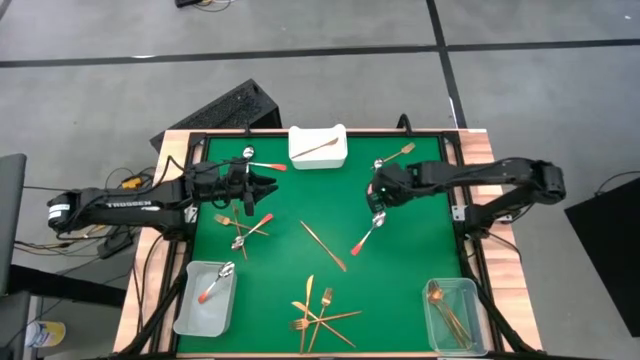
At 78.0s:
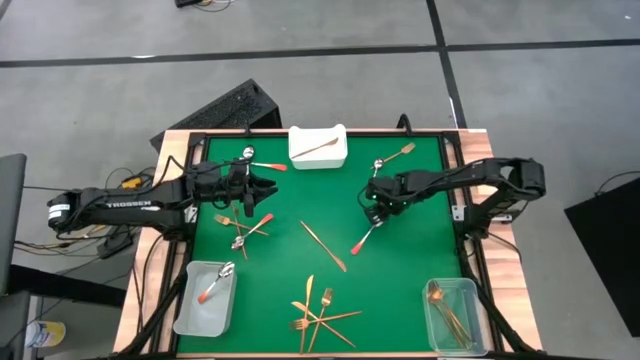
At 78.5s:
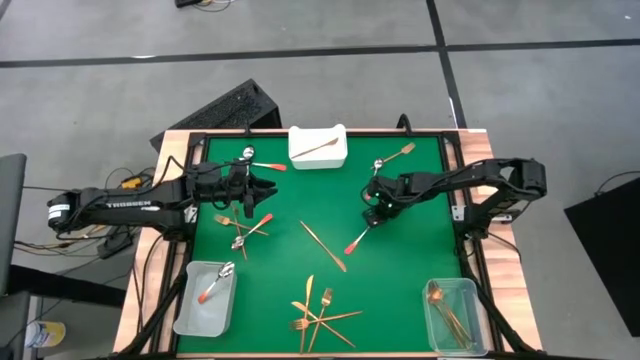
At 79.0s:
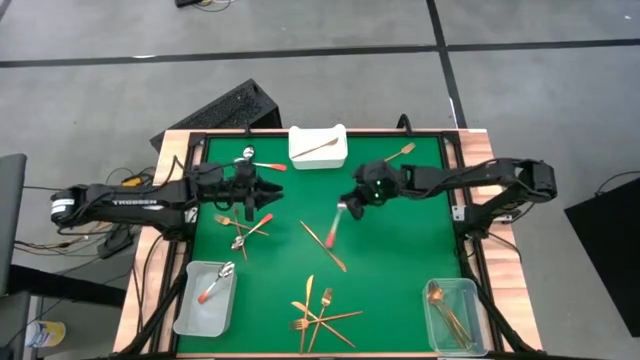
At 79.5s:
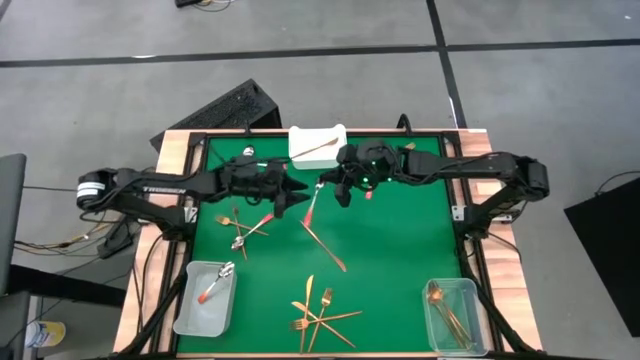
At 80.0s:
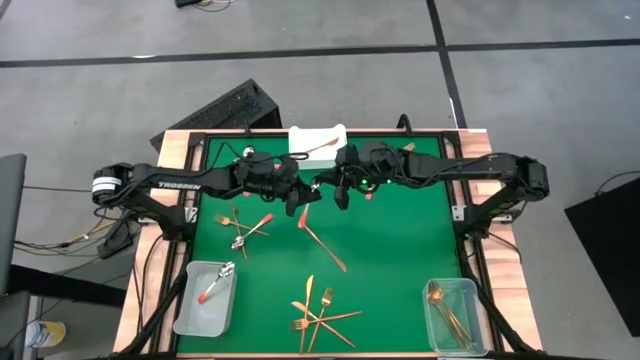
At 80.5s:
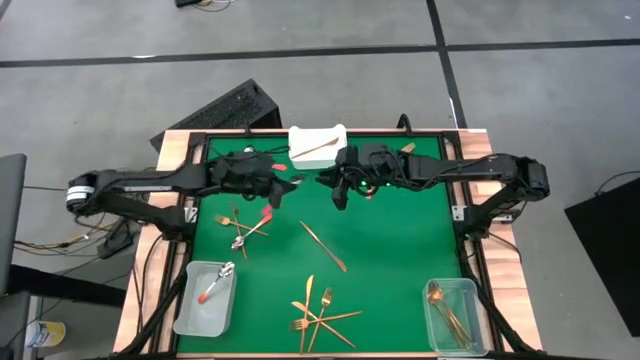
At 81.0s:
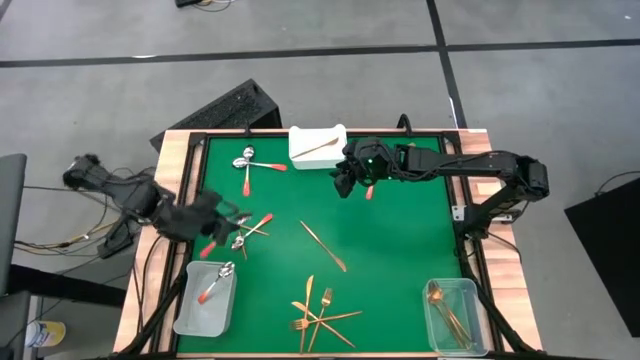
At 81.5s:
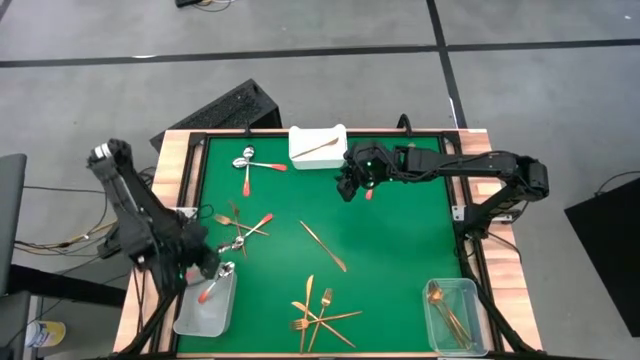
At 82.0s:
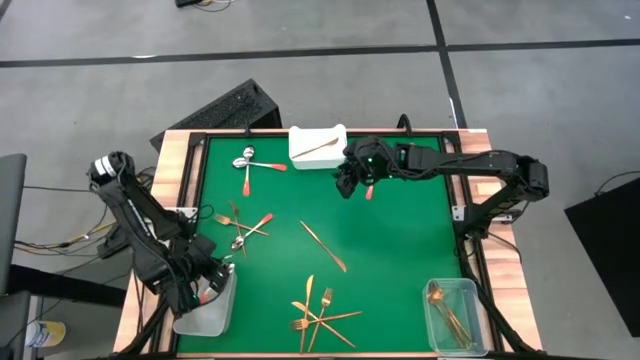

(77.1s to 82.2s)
Task: Sort silverware by color (type)
Put the orange spoon into the gray bin

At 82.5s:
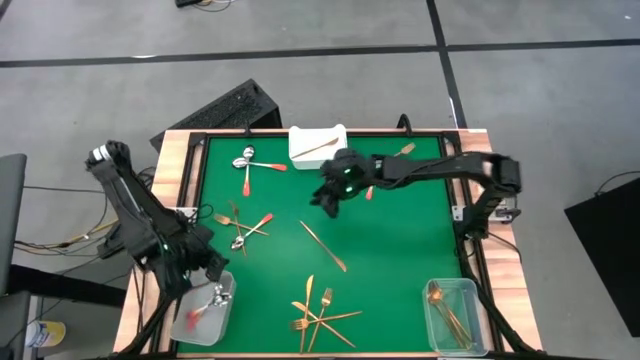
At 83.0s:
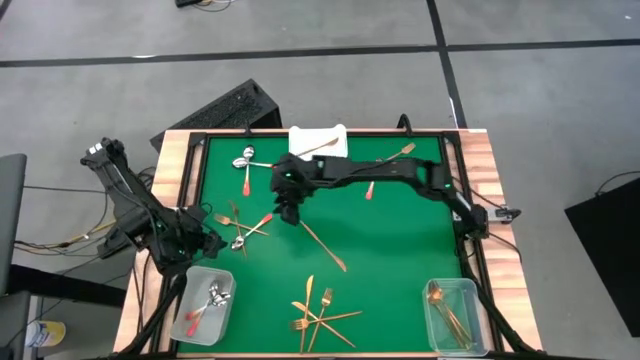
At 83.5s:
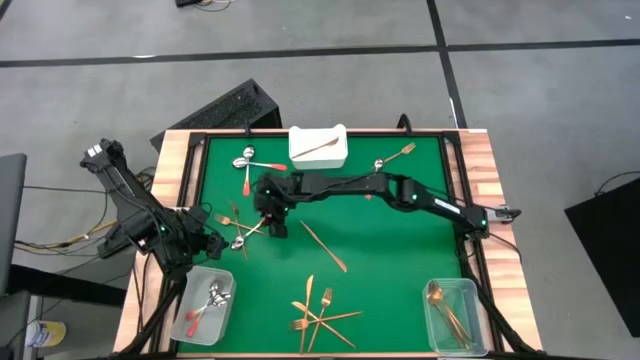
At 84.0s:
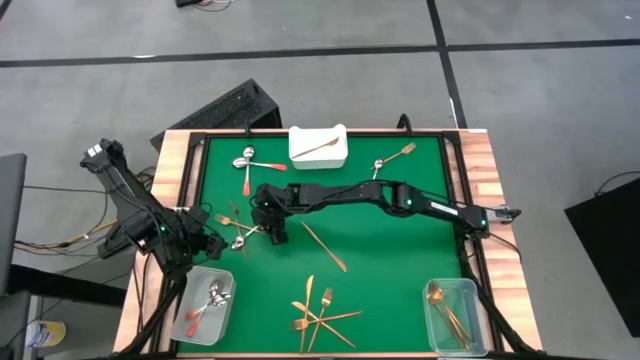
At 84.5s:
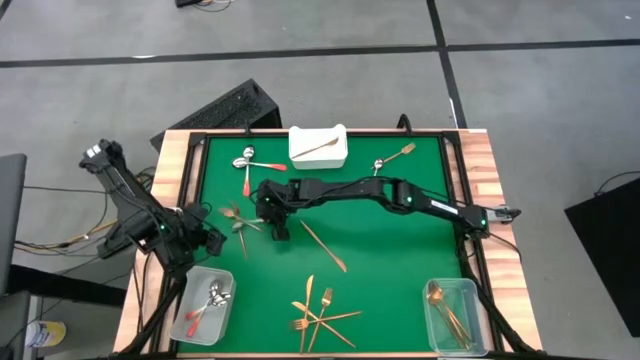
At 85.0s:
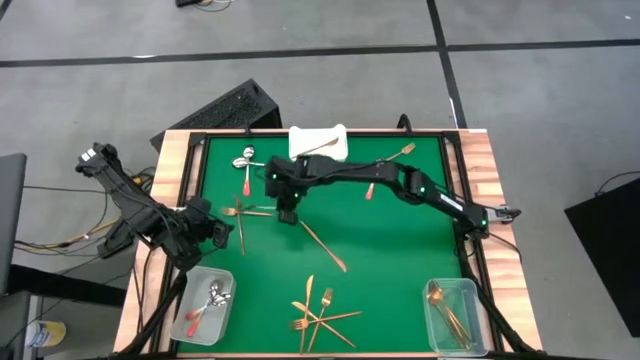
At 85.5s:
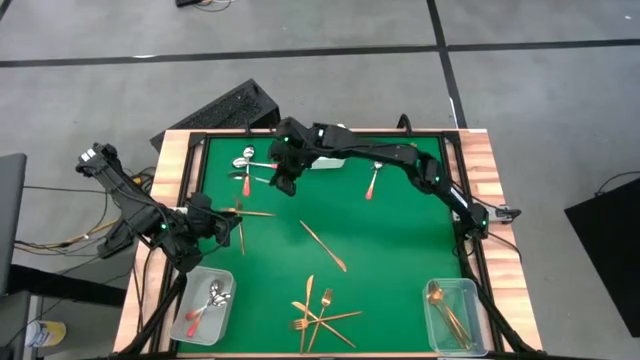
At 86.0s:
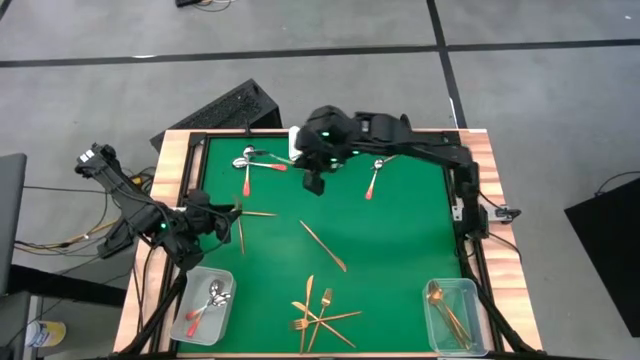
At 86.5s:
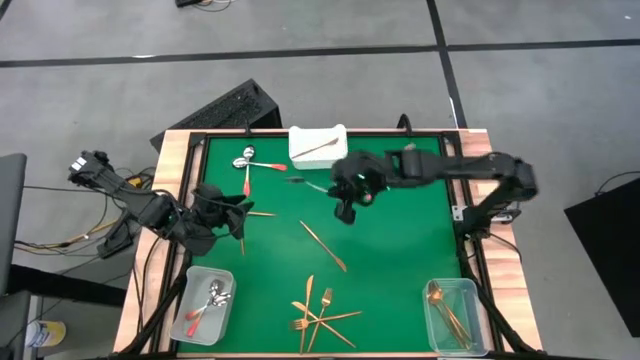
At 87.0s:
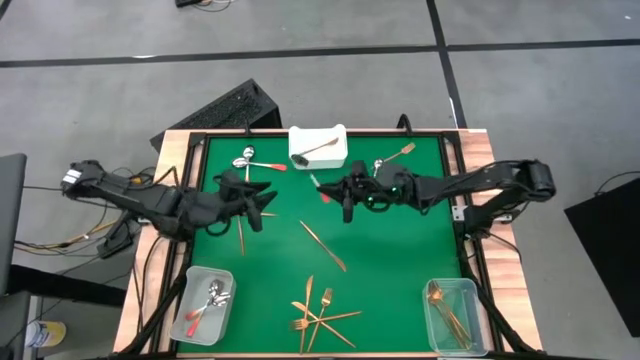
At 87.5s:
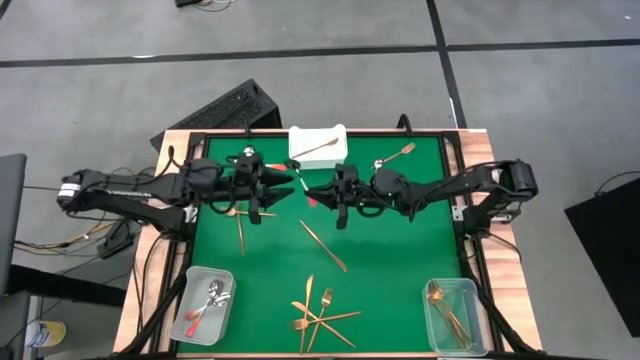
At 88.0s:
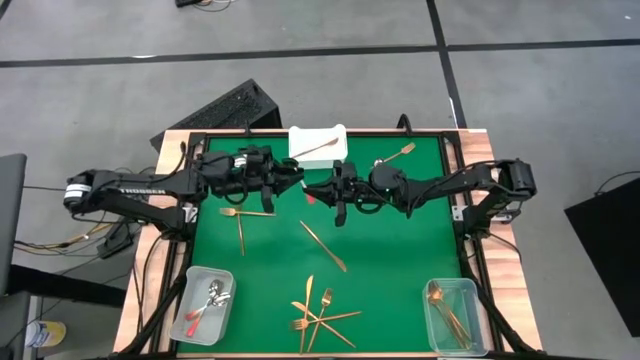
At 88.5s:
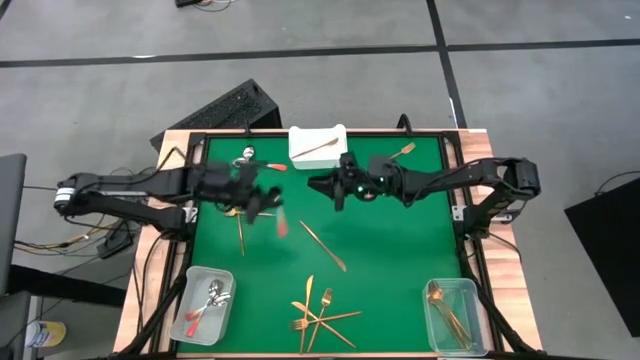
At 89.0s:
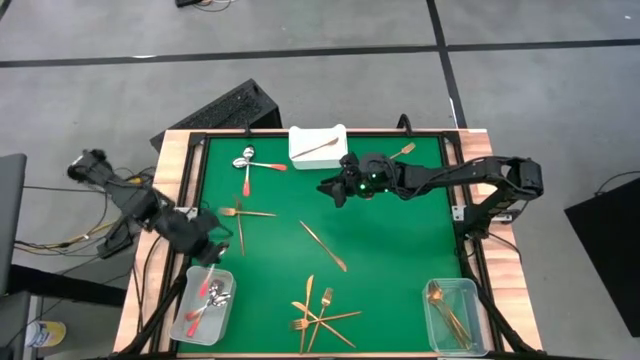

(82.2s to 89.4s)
Put the orange spoon into the gray bin

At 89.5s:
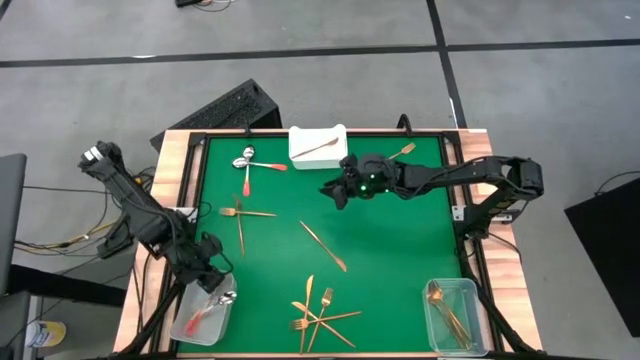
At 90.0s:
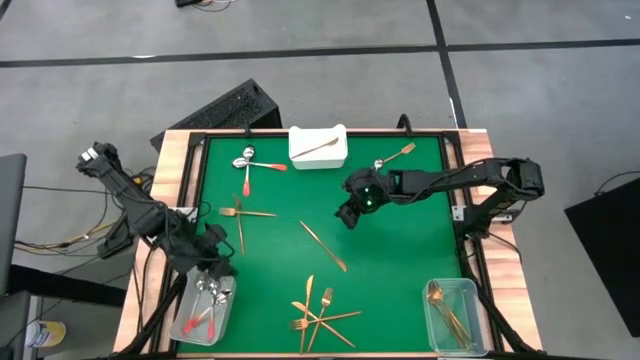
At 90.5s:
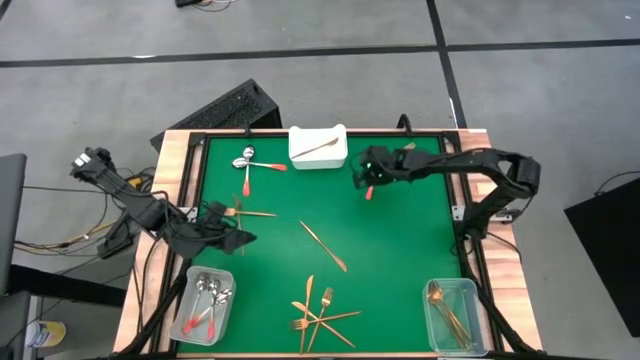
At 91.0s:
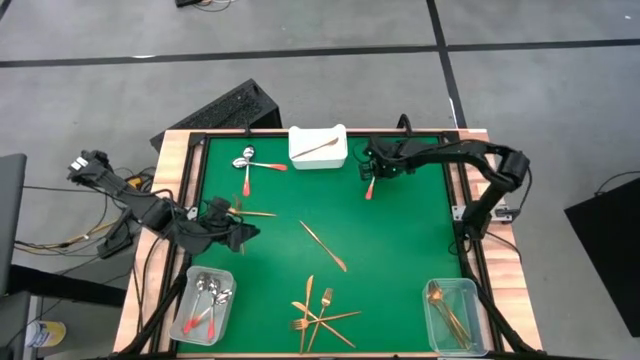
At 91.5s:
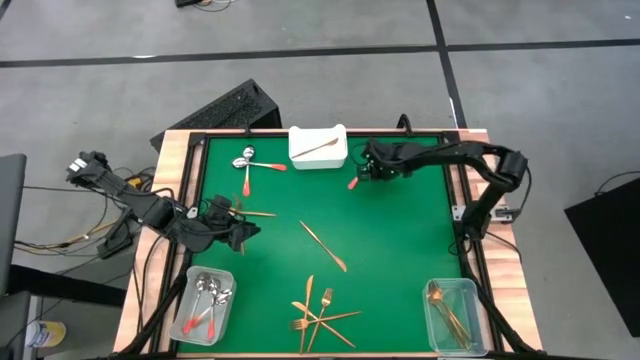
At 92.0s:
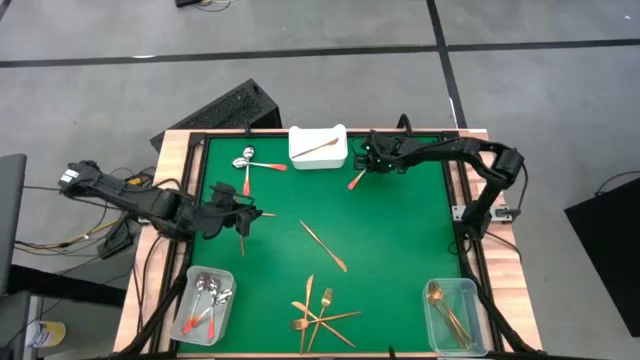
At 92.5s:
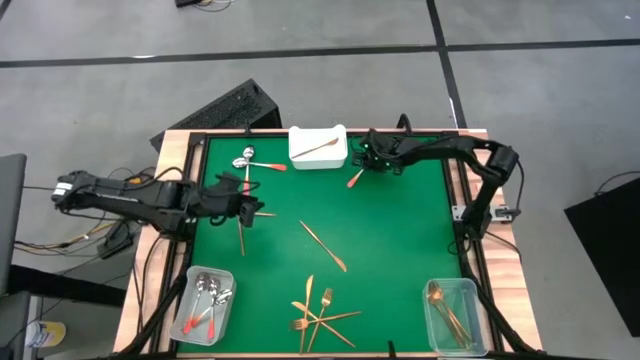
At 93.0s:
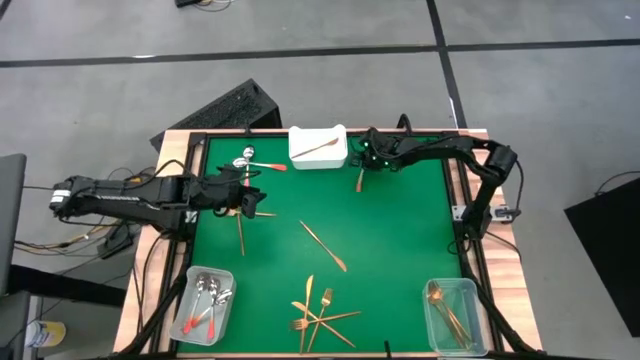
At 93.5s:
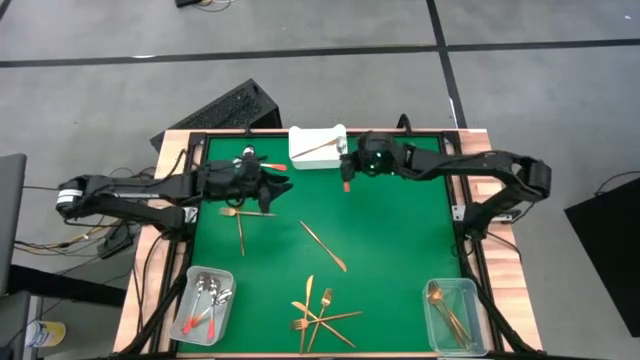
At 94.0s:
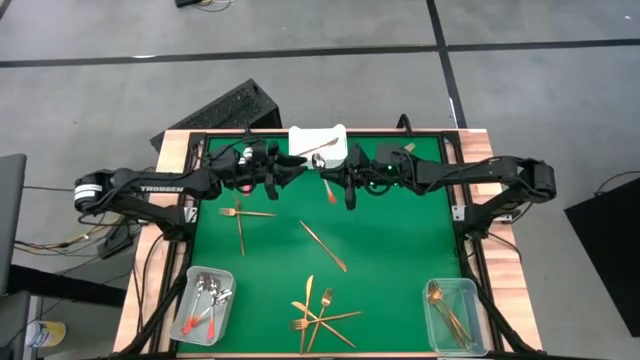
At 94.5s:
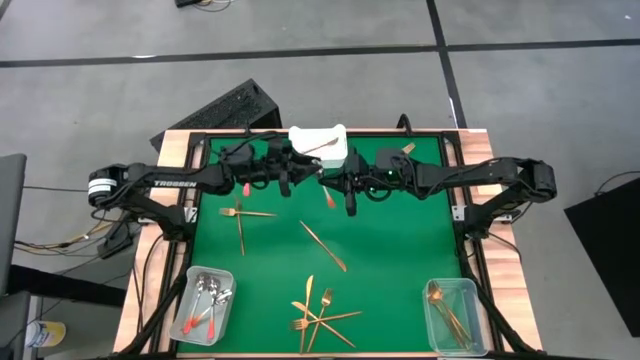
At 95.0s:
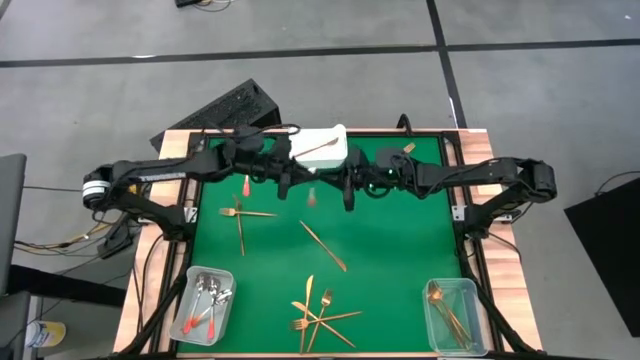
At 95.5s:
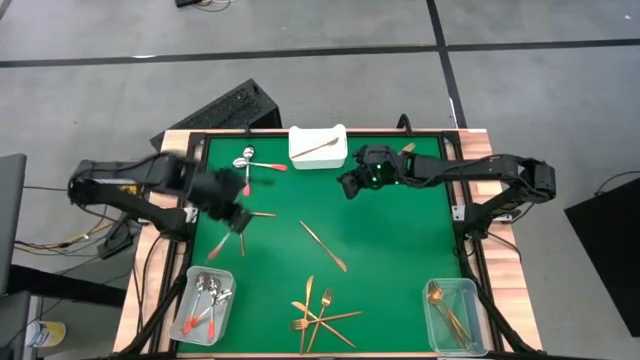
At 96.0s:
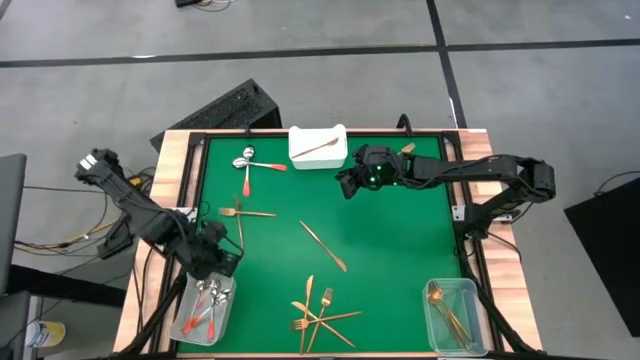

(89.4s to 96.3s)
Put the orange spoon into the gray bin

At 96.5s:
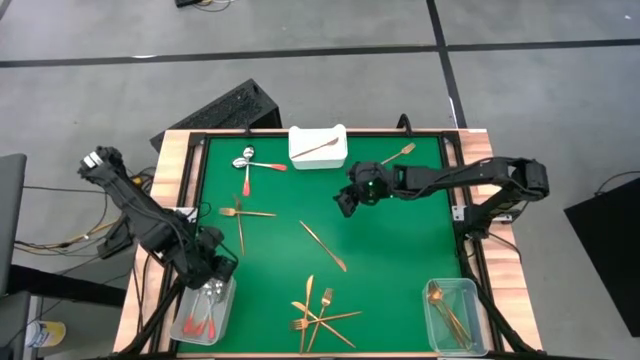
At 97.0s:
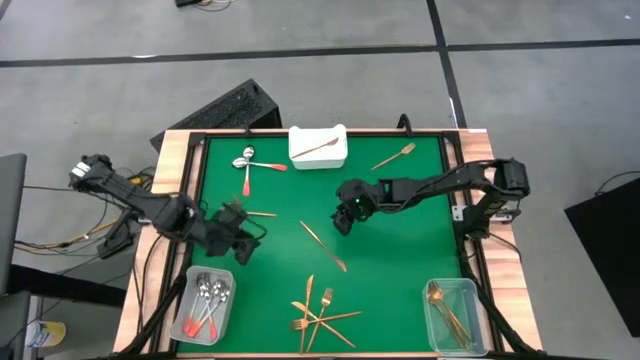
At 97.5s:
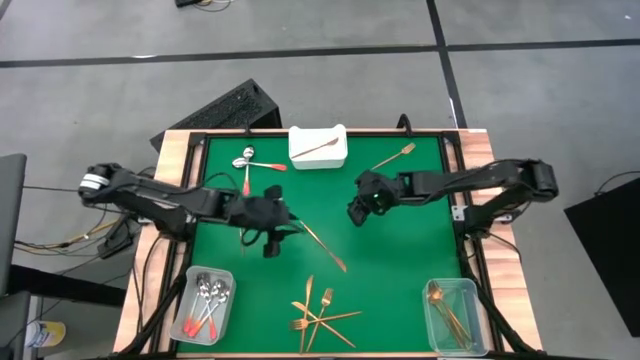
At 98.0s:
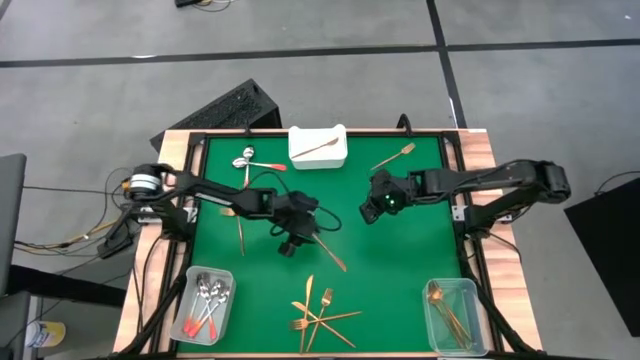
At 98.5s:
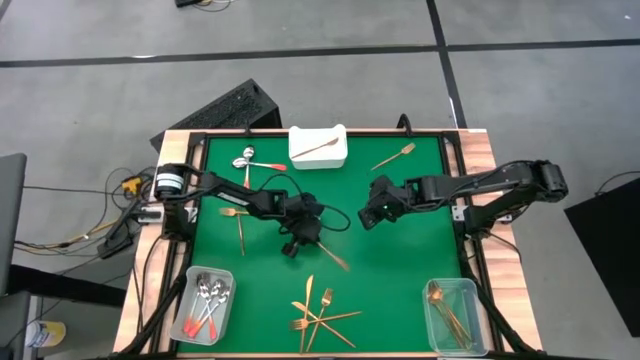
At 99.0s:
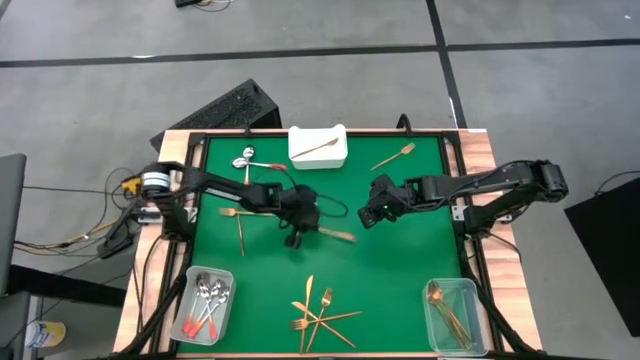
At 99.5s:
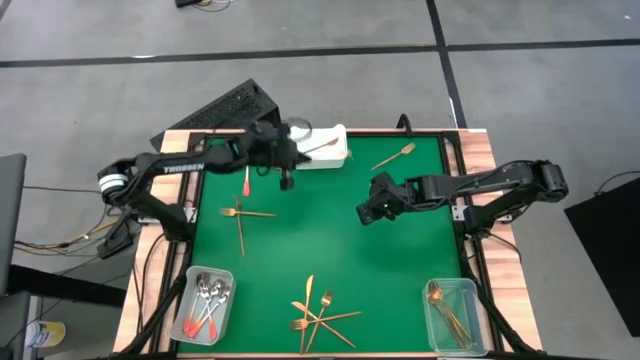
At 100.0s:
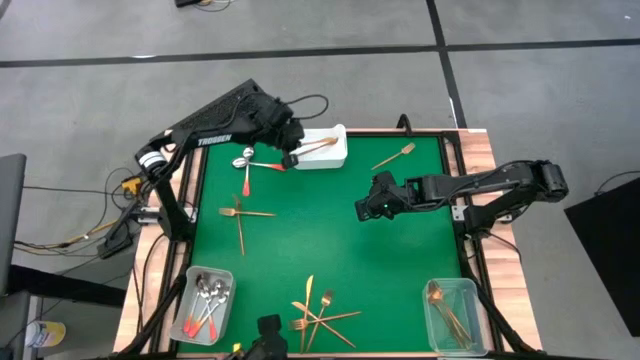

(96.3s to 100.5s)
Put the gold table knife into the white bin
